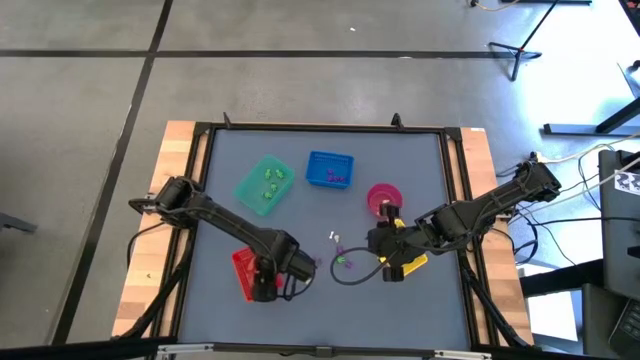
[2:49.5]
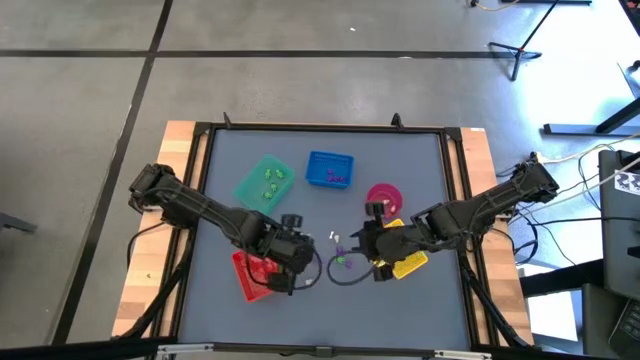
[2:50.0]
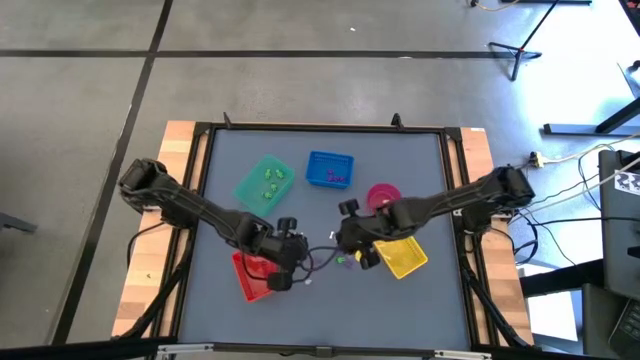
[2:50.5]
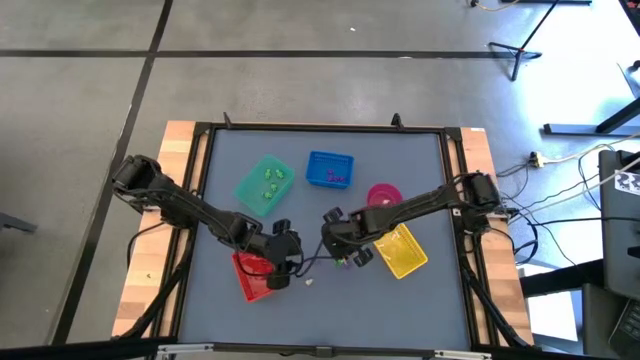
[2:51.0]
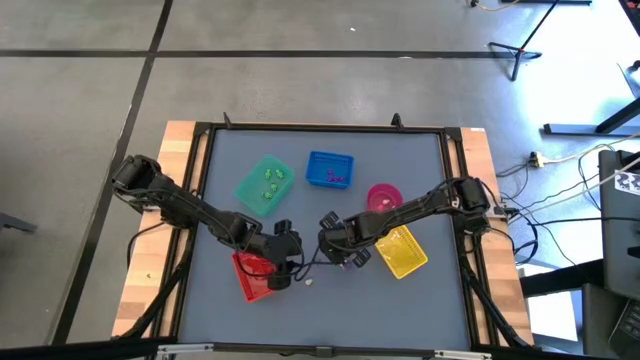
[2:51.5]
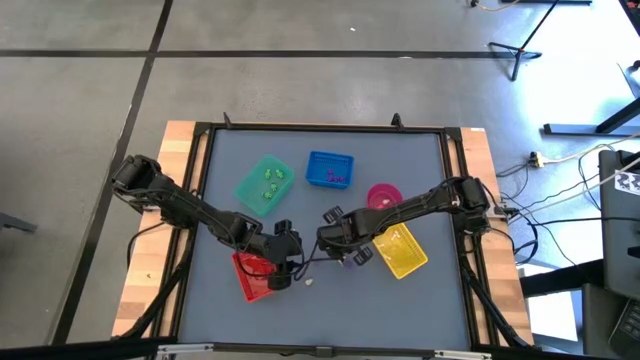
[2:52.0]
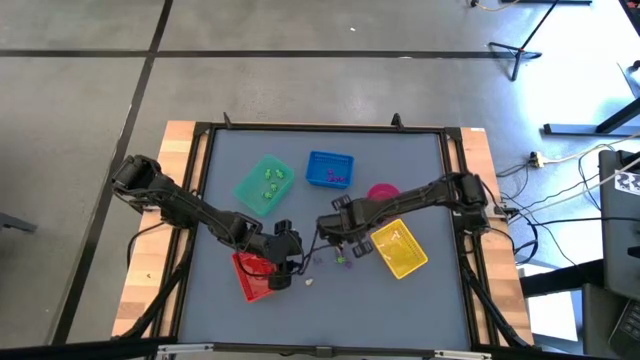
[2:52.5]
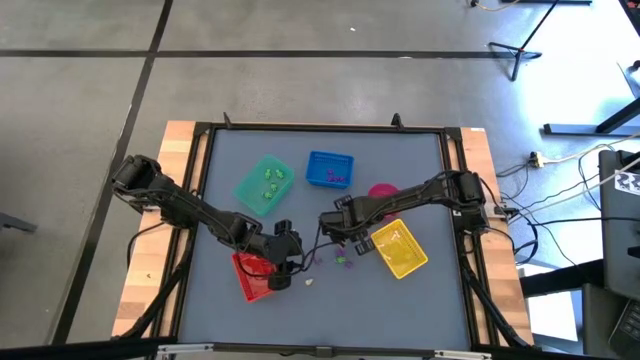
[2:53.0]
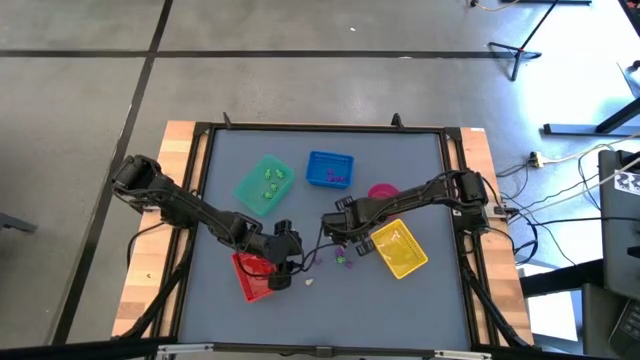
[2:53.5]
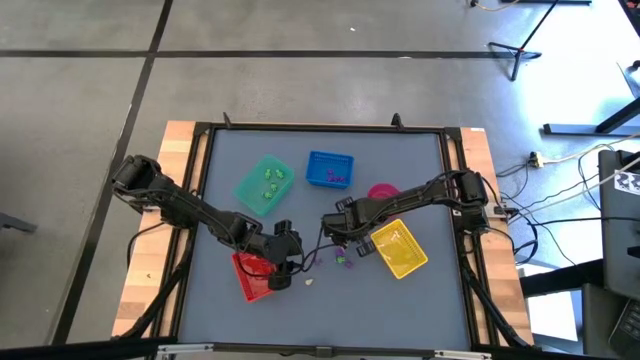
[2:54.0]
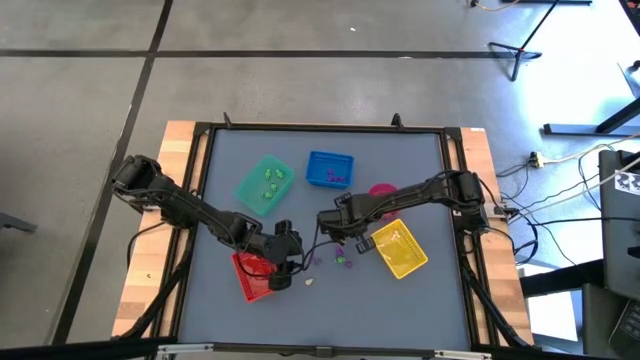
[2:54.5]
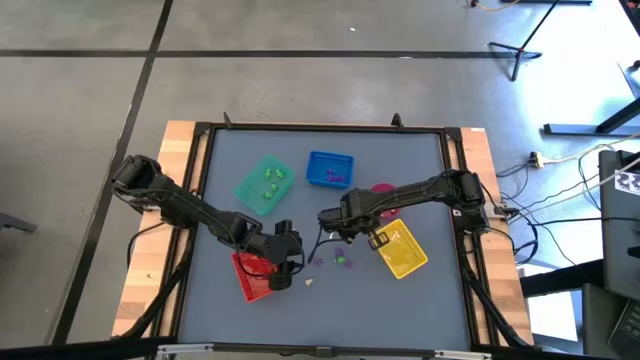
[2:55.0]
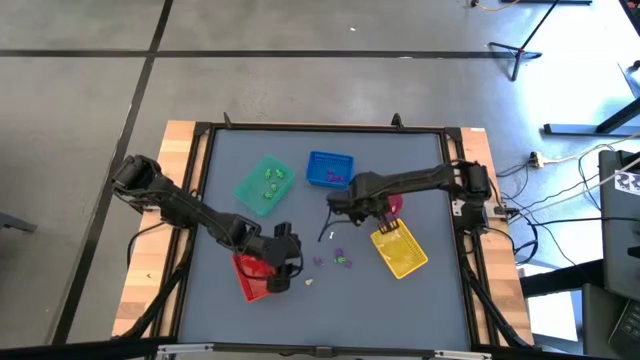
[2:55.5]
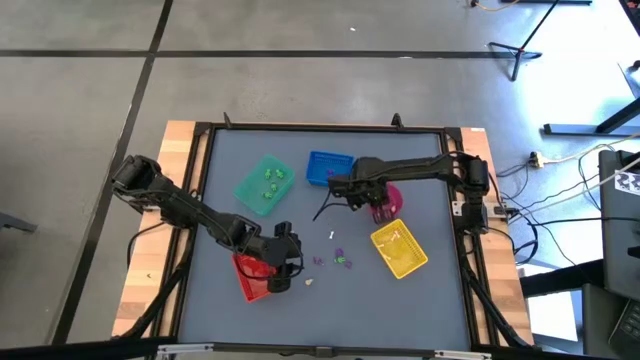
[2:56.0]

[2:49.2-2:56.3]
Task: Sort Halloween decoration
Put the yellow skull toy into the red bin

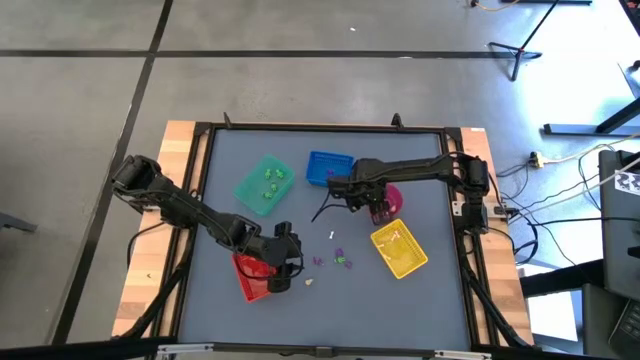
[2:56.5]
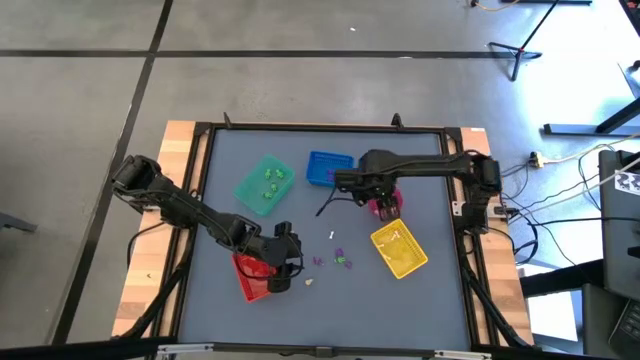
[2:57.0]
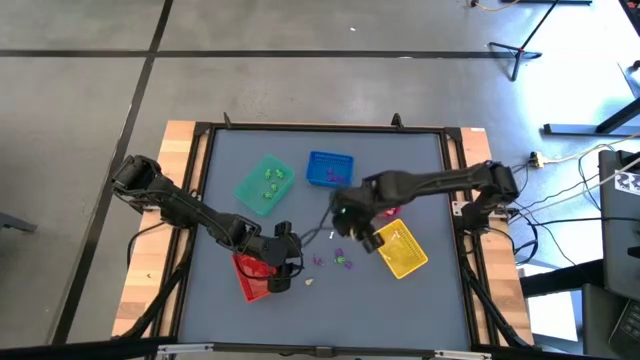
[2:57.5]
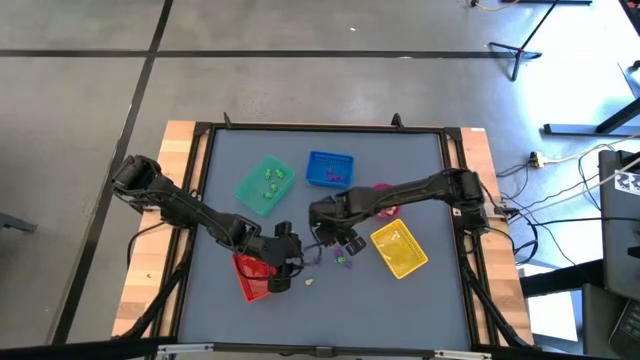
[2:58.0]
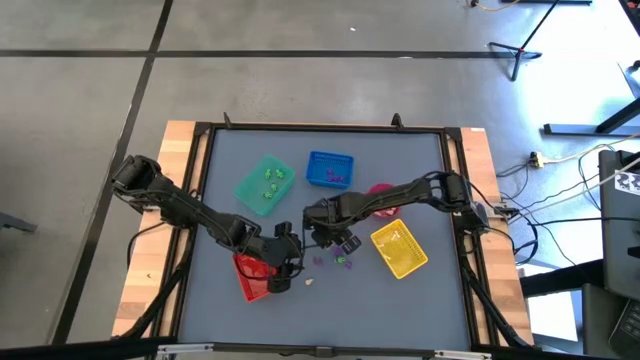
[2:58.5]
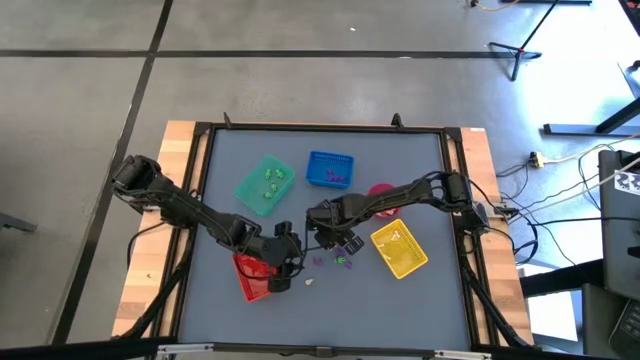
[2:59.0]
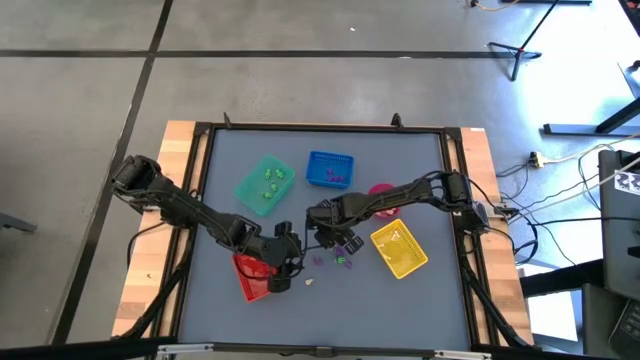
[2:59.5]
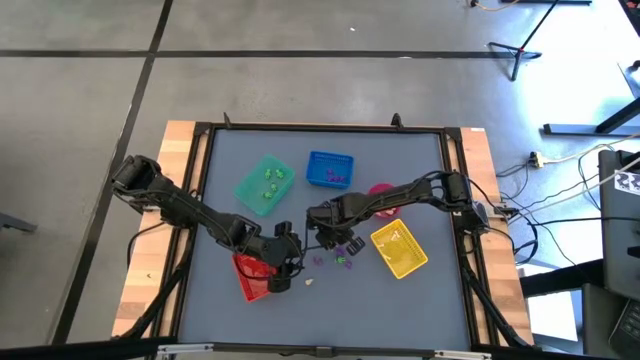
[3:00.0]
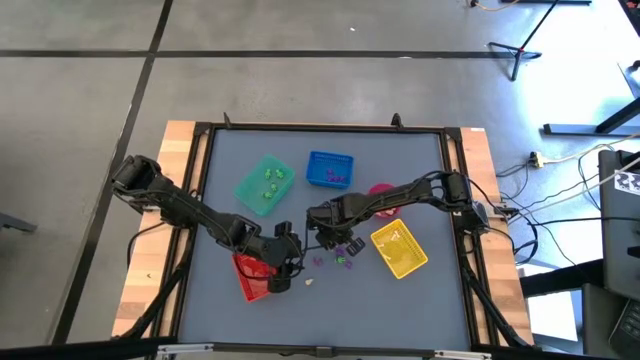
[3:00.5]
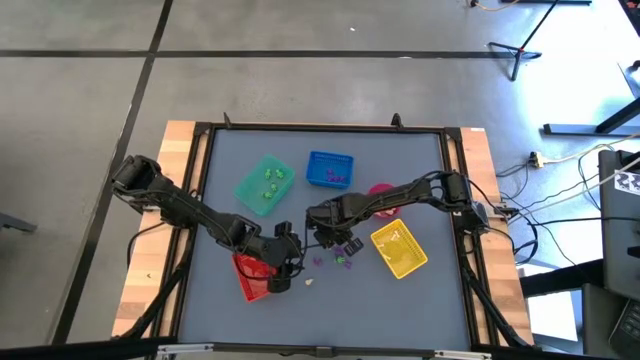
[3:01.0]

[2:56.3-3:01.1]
Put the white bone toy into the yellow bin

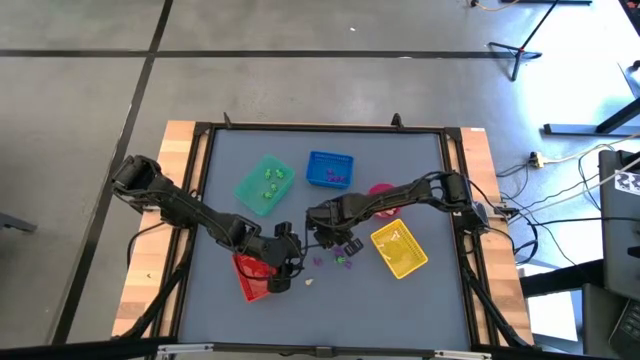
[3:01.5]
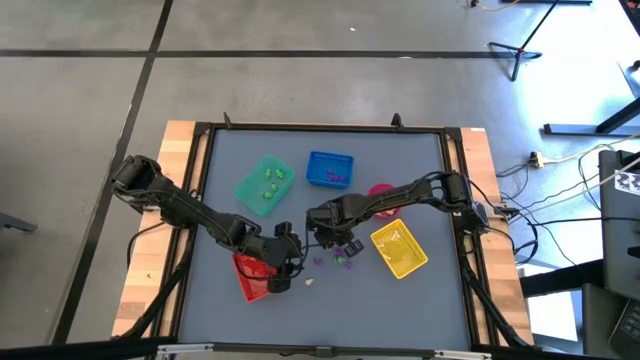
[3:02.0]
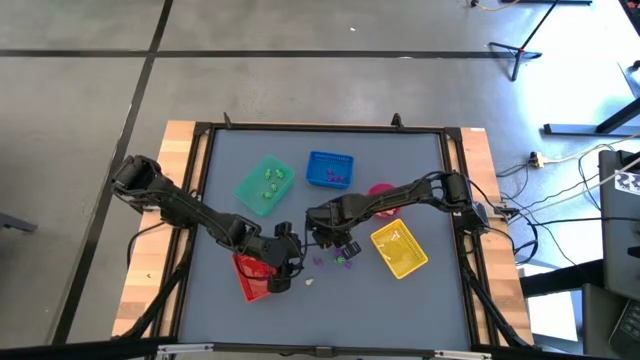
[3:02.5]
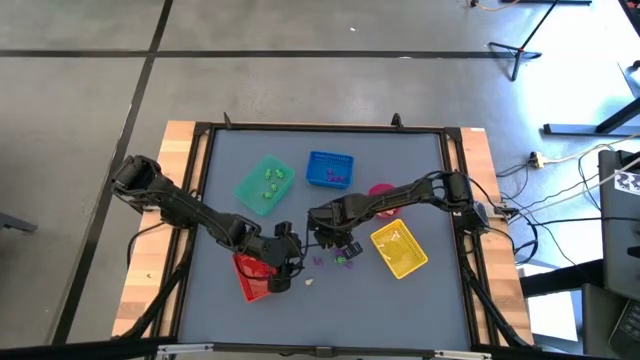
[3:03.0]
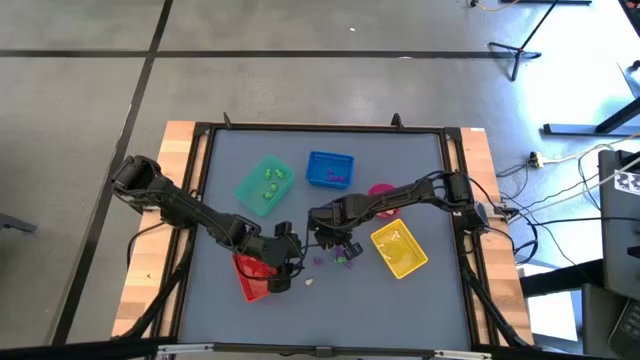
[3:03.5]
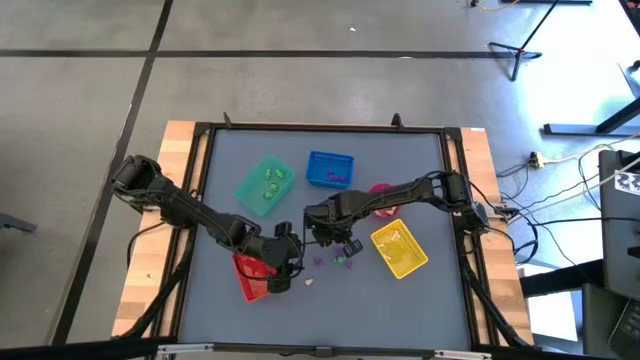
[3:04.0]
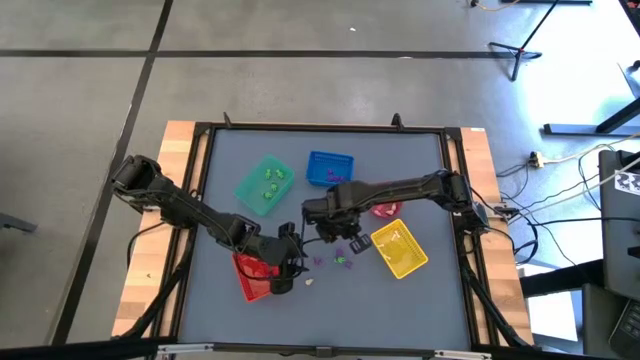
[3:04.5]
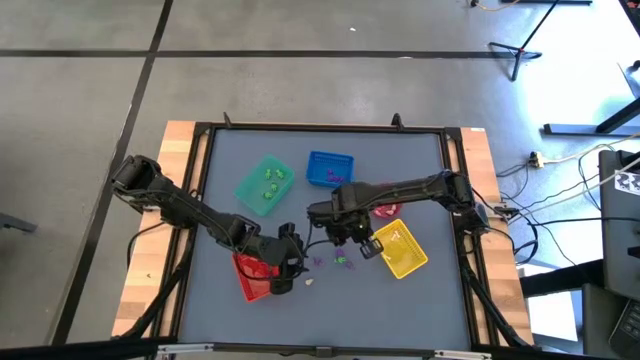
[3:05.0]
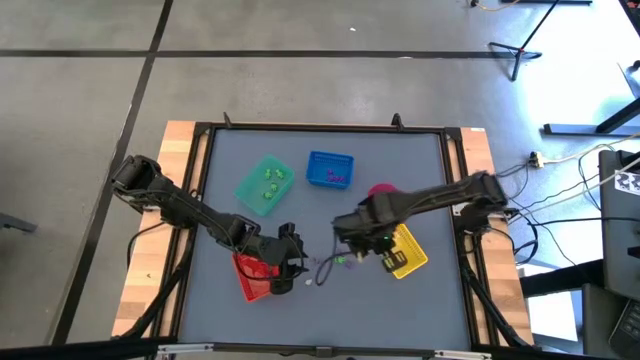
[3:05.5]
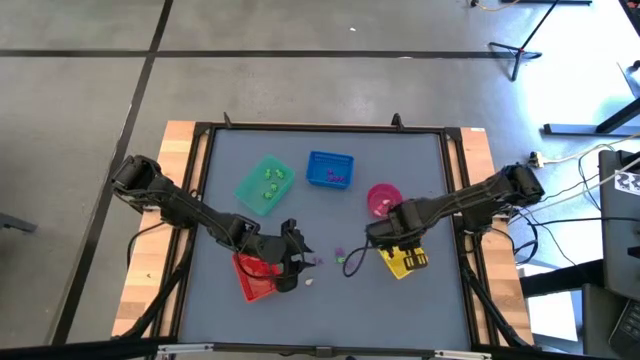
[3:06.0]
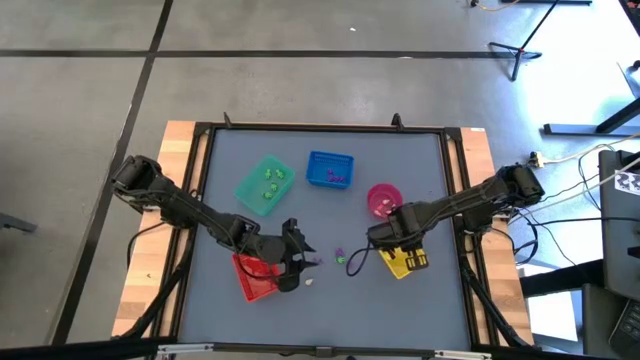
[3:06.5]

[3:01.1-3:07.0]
Put the white bone toy into the yellow bin

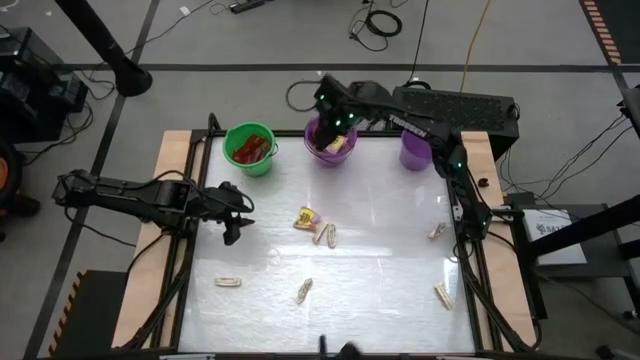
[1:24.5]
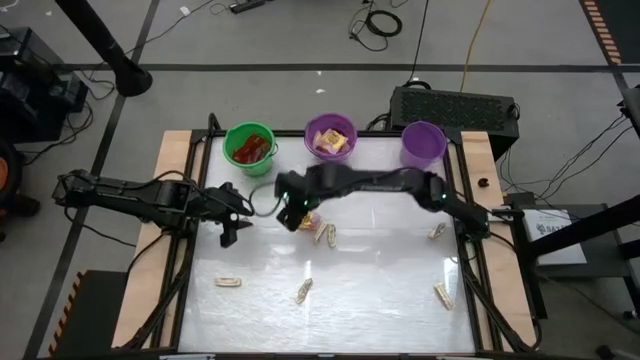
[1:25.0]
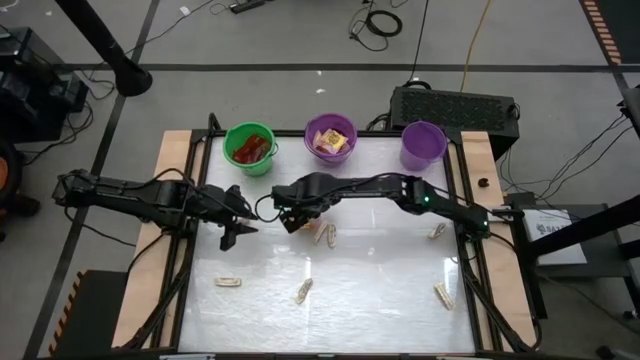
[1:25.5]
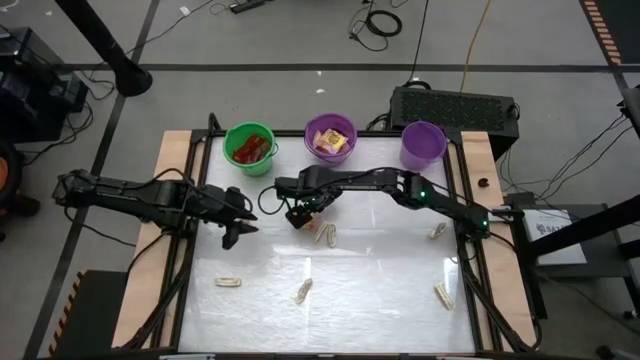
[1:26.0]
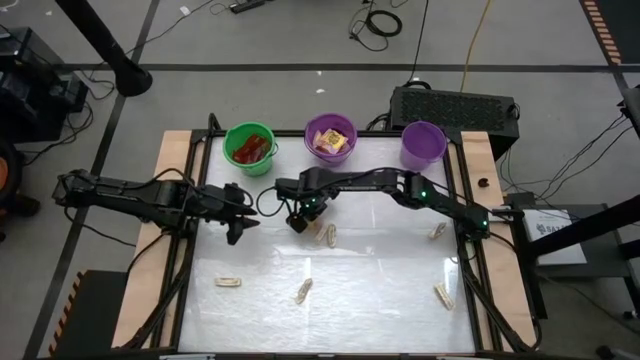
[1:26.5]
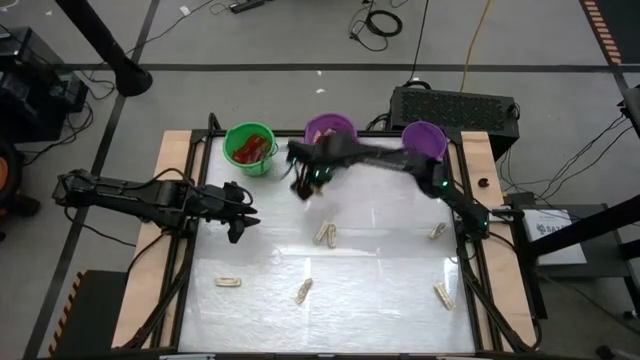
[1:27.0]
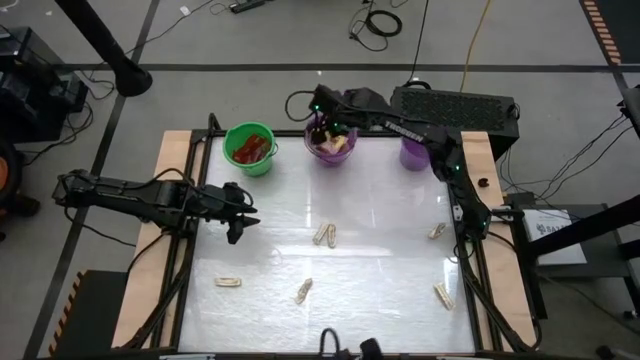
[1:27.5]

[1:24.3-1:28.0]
Task: Sort candy by brand, put in halloween buckets
Put the yellow candy pack in the left purple bucket

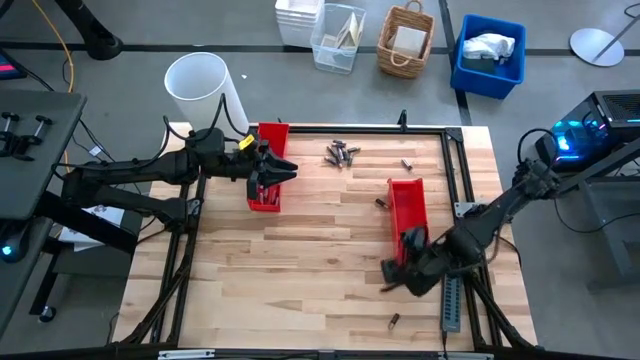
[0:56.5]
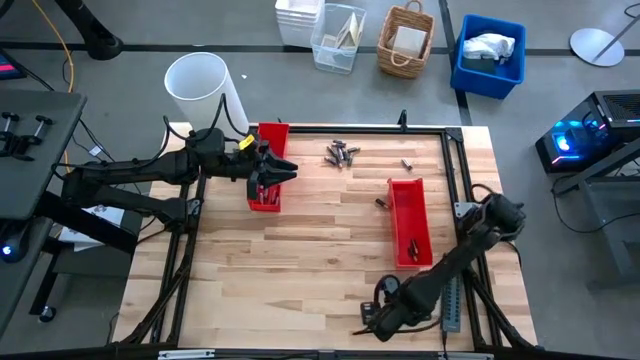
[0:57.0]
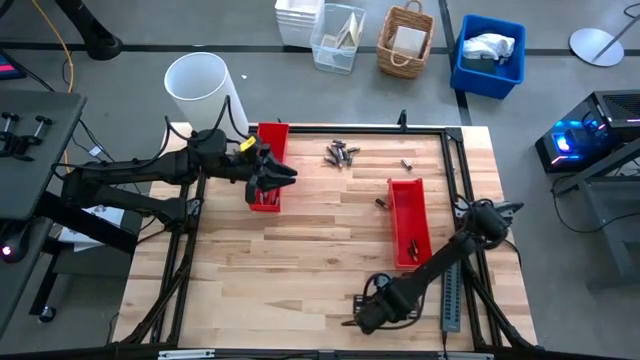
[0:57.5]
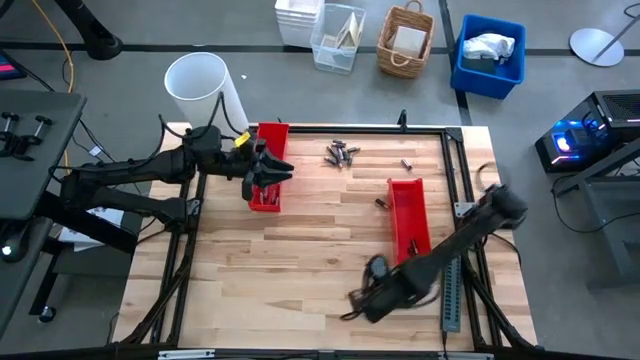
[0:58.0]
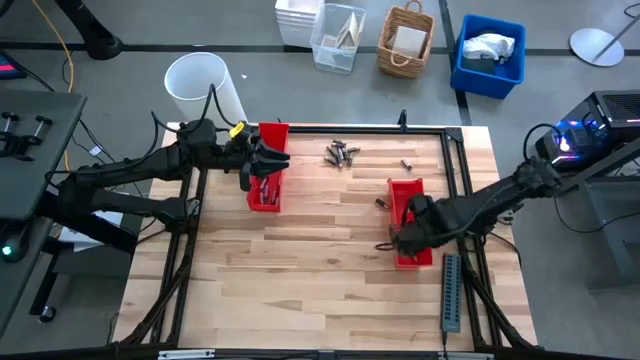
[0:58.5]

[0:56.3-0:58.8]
Task: Sort batteries
Put the black battery into the bottom red bin
